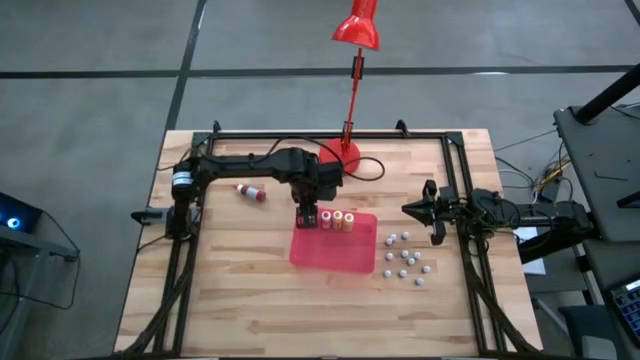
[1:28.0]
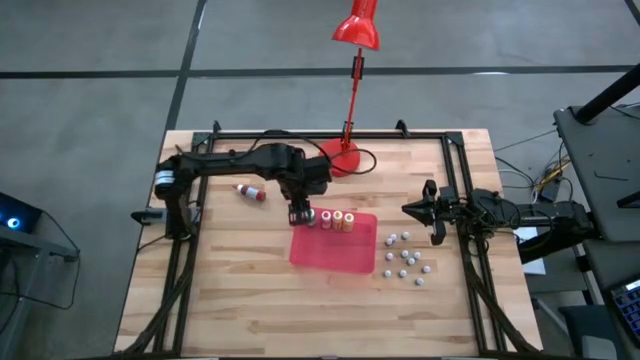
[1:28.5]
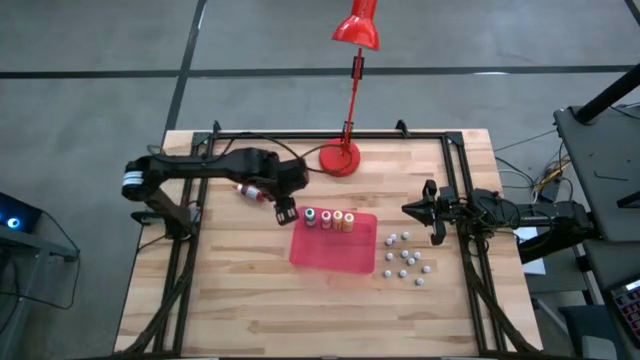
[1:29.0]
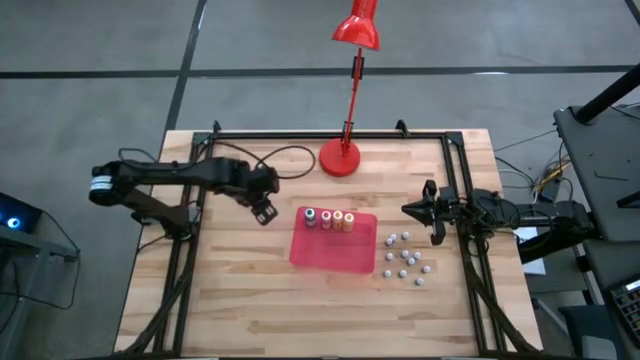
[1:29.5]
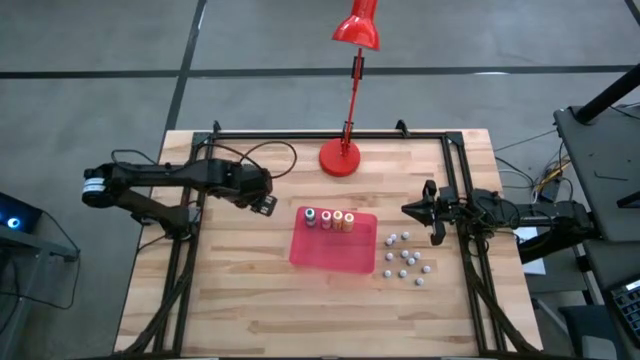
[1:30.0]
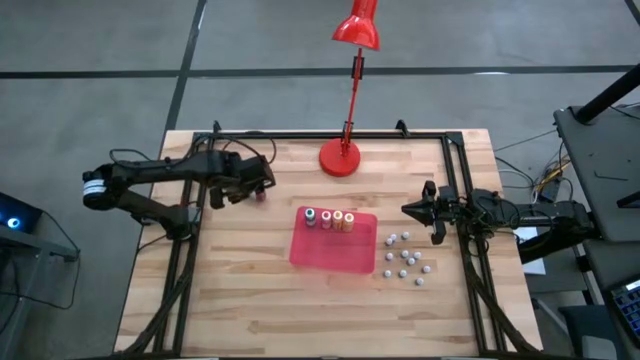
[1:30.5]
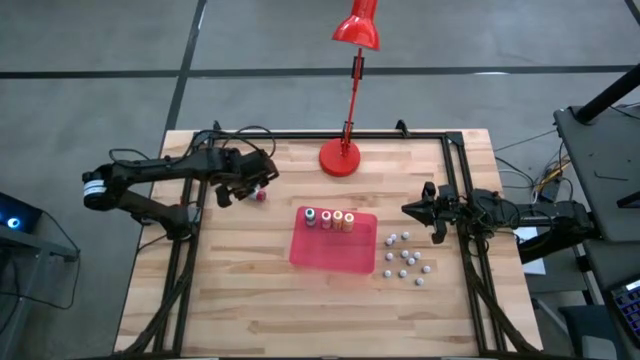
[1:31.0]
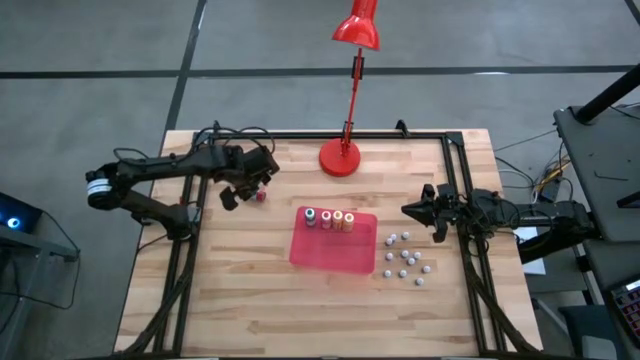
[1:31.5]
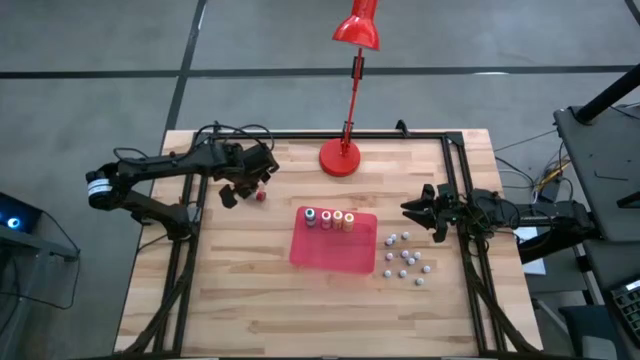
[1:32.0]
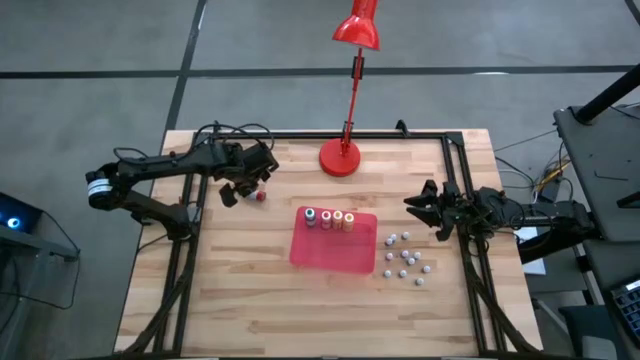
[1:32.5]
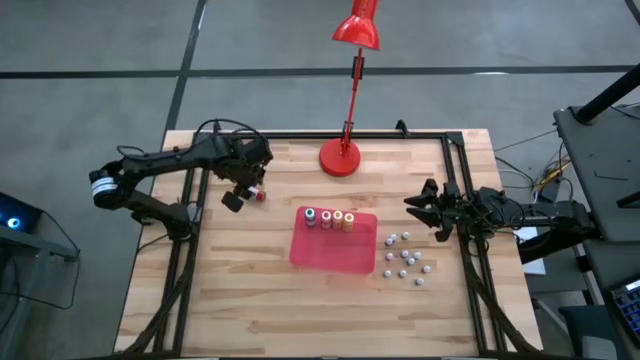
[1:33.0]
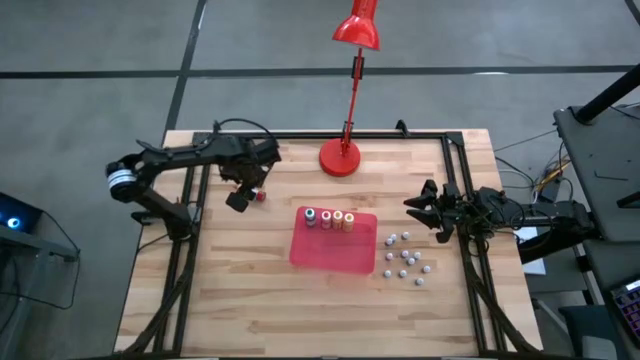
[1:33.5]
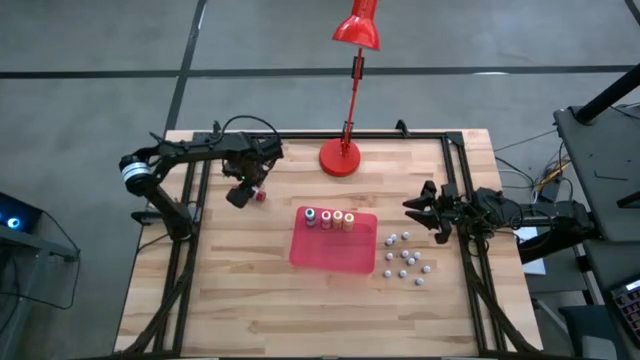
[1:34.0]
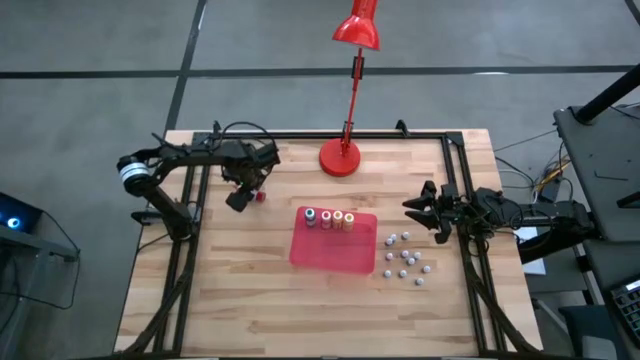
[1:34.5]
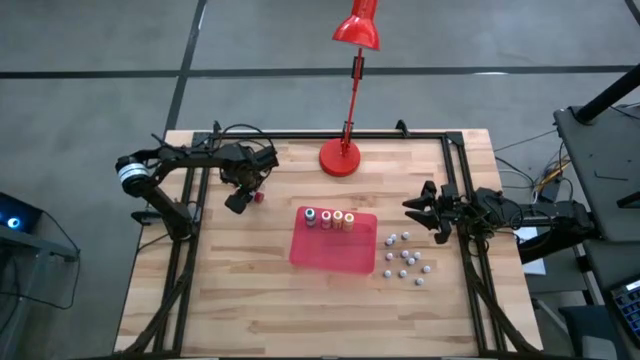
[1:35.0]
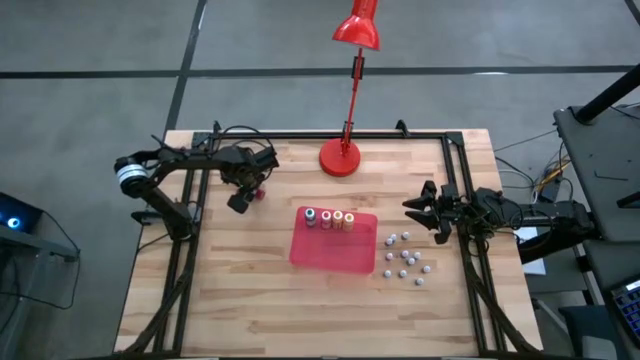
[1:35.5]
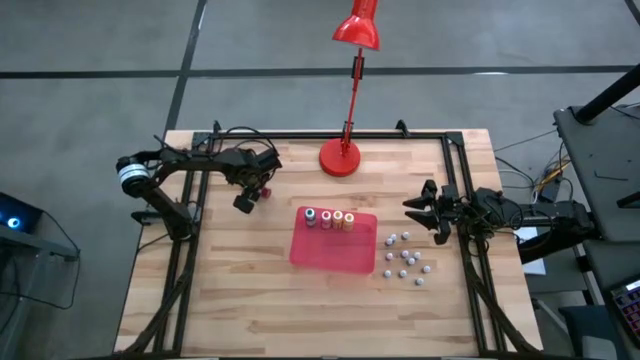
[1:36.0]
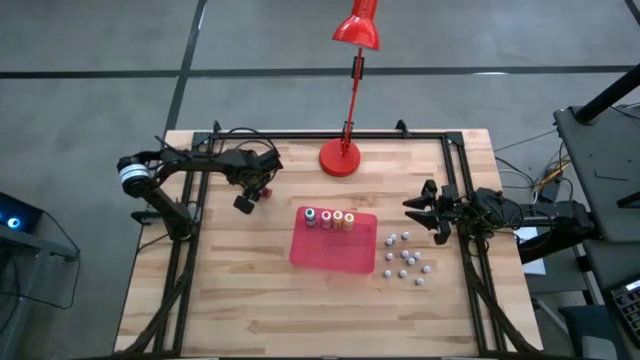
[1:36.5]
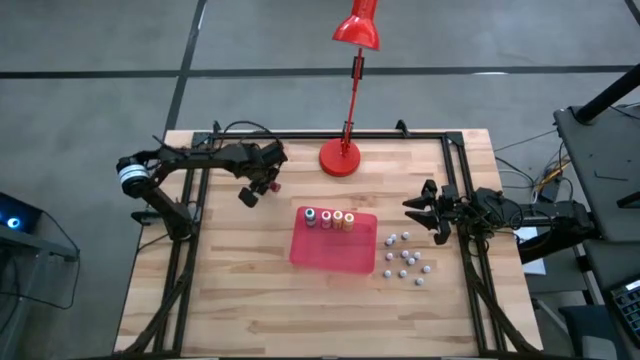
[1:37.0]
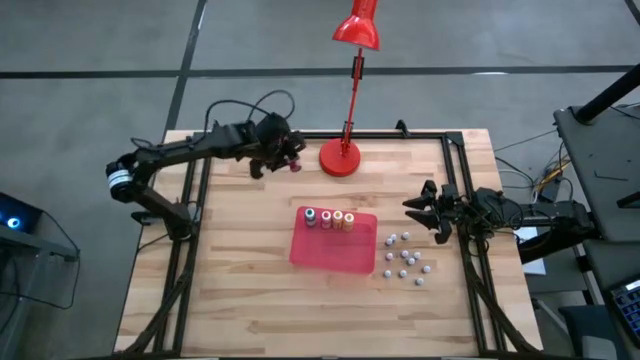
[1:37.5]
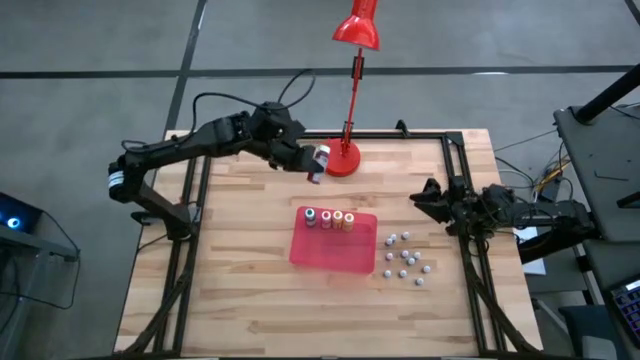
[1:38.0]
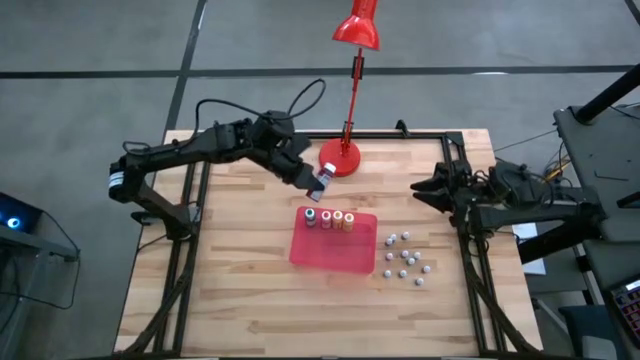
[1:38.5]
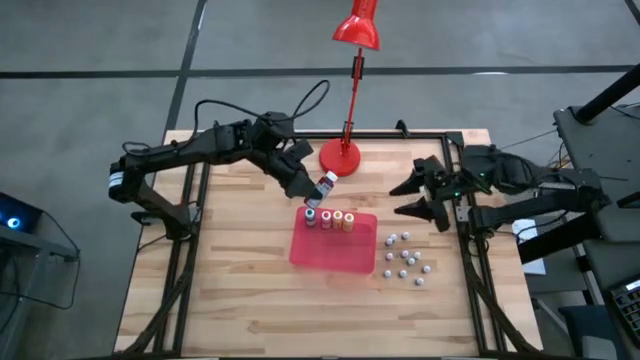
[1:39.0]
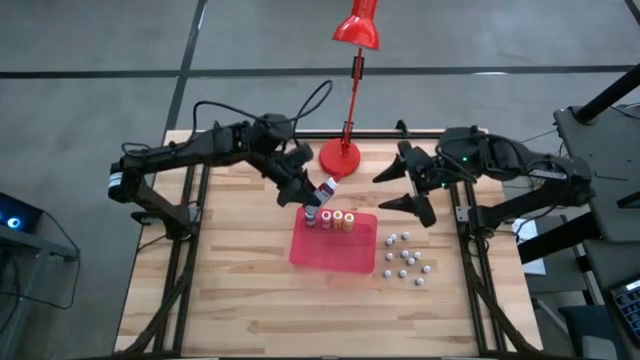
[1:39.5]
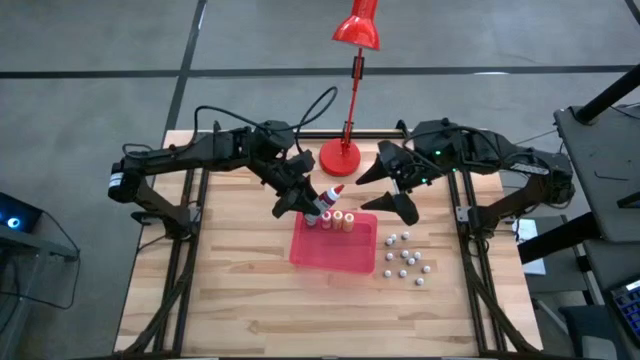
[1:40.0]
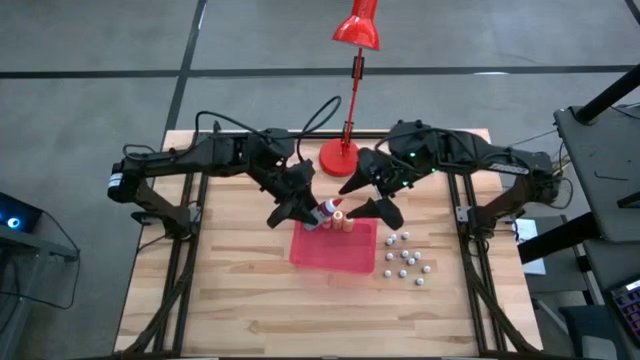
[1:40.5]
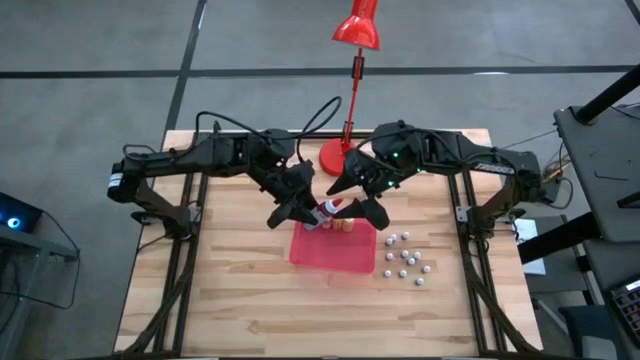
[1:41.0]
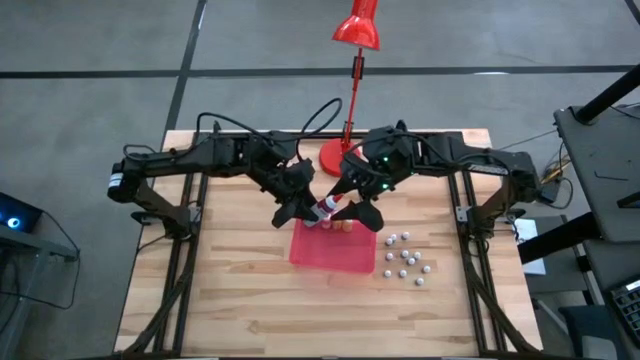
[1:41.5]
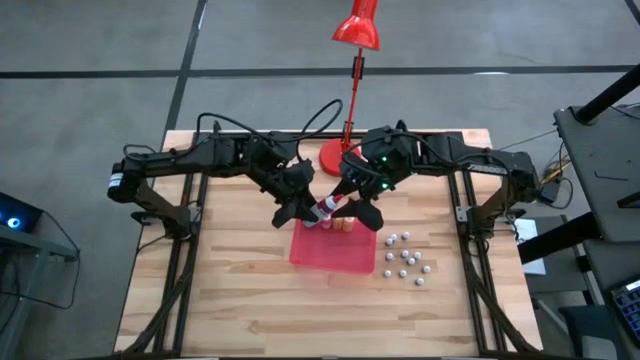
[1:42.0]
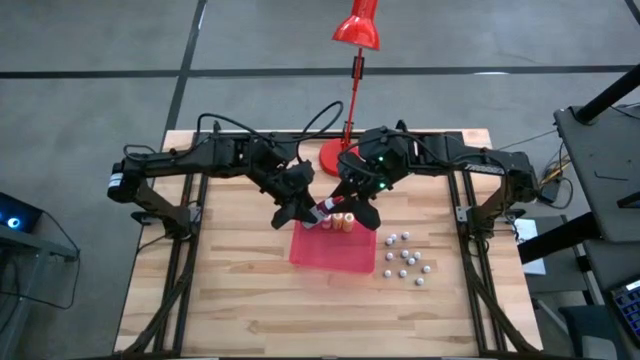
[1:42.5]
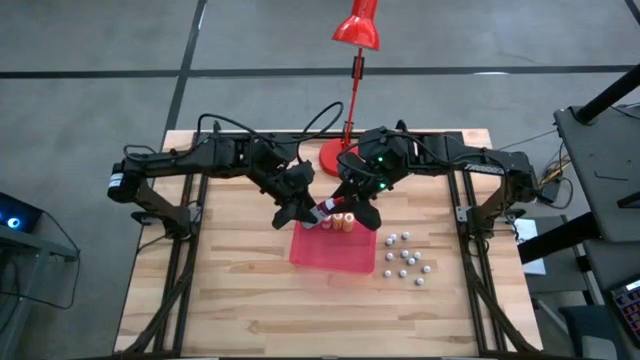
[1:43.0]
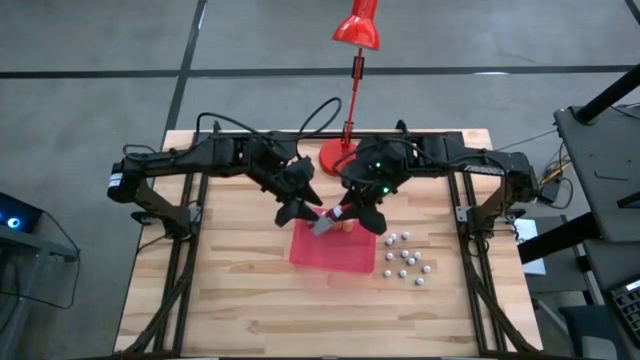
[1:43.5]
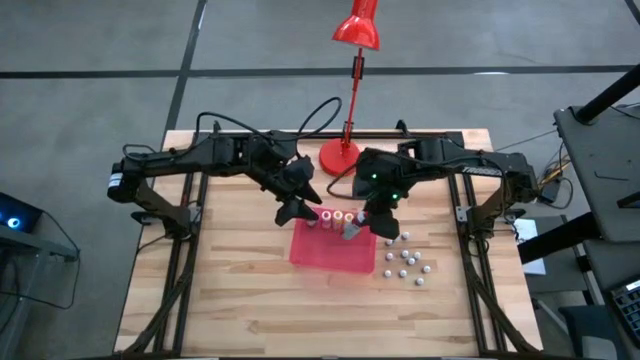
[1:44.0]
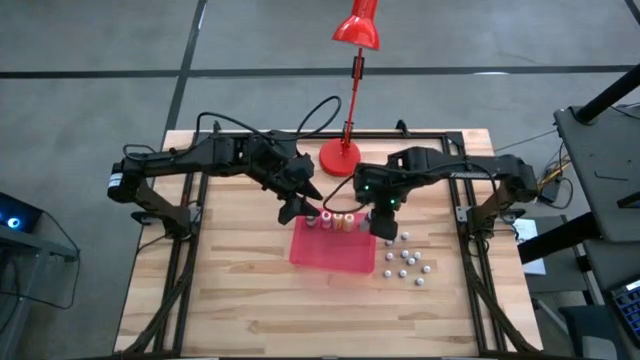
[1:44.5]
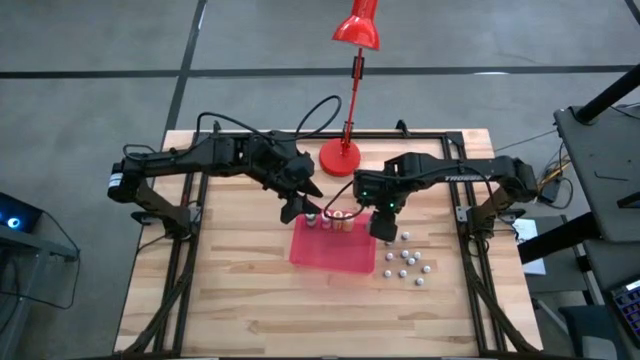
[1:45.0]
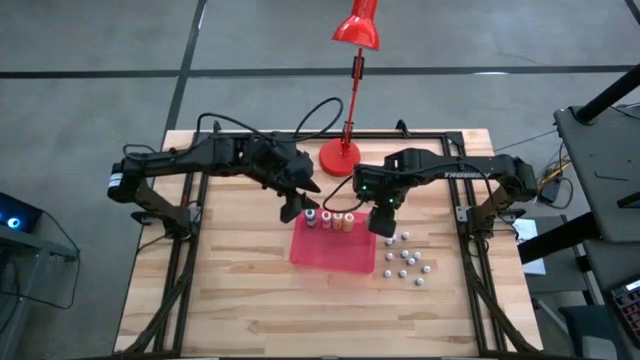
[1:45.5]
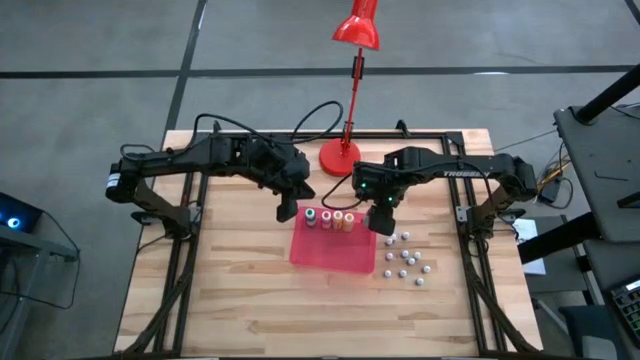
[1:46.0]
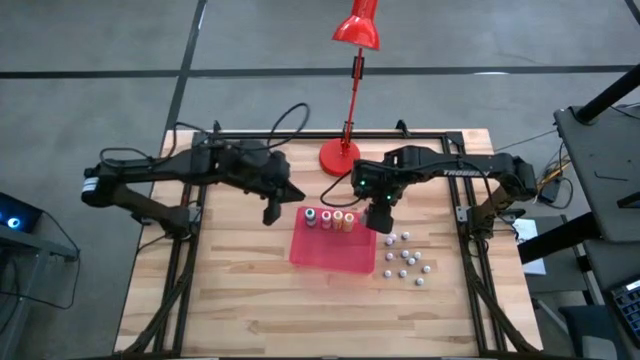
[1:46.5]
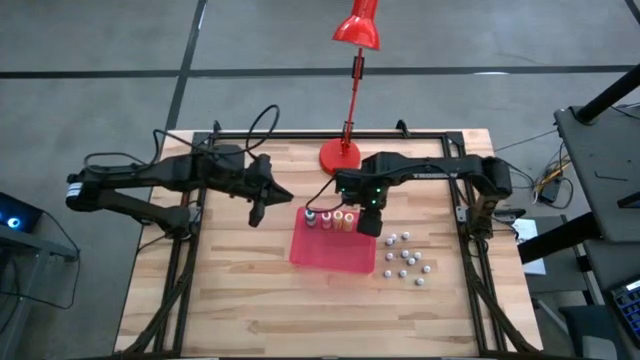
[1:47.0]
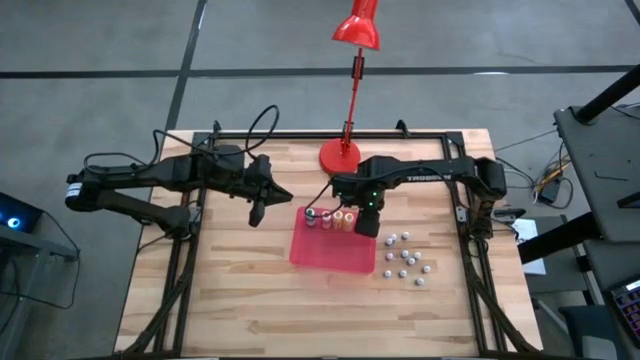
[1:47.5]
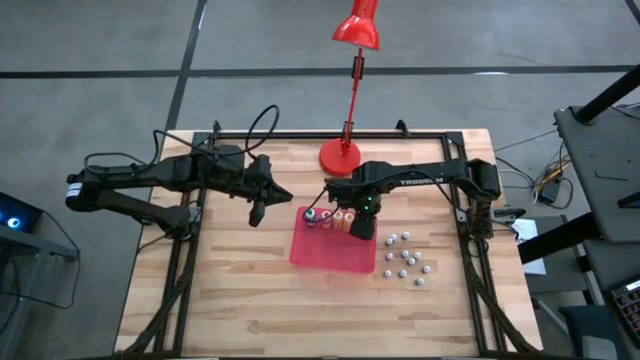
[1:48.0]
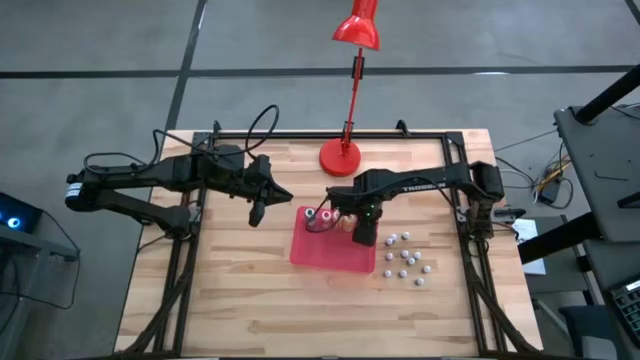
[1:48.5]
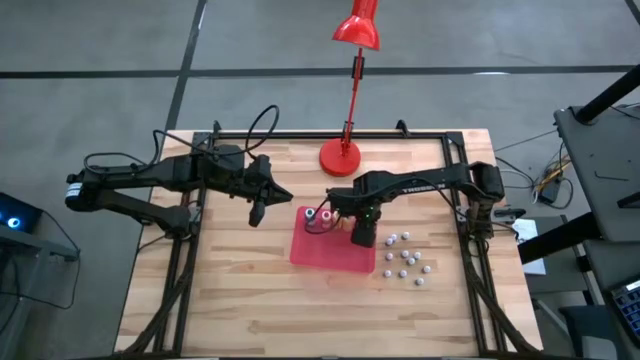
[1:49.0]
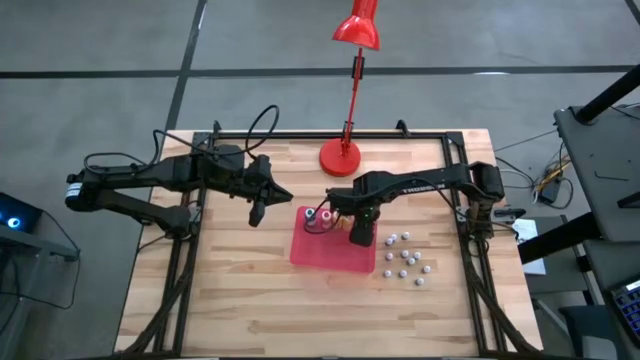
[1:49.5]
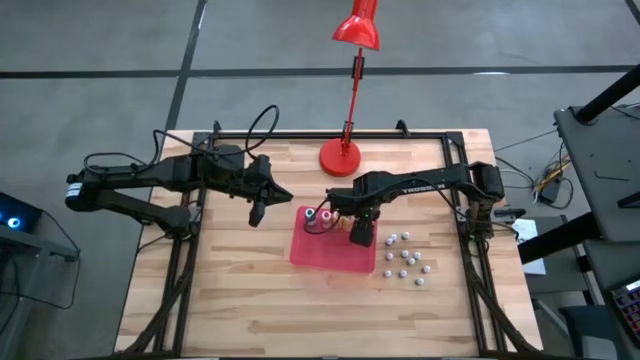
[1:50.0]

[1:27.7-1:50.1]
Task: Pick & Place food coloring
Put the large red food coloring bottle into the red bin
